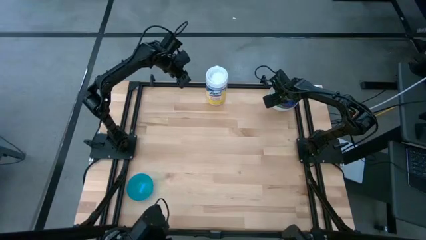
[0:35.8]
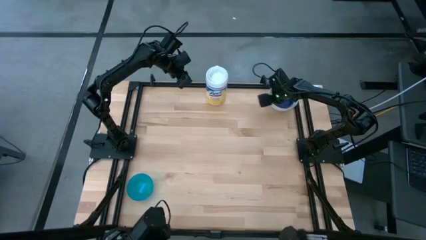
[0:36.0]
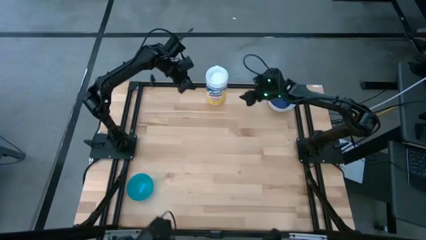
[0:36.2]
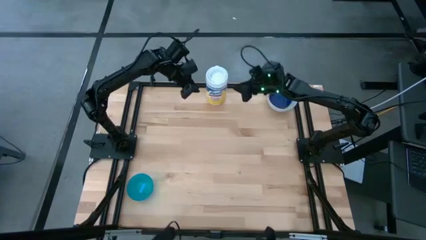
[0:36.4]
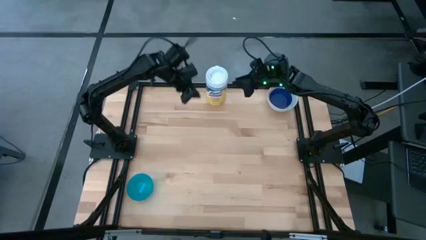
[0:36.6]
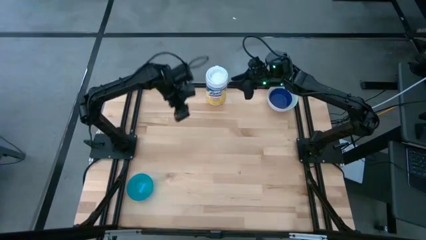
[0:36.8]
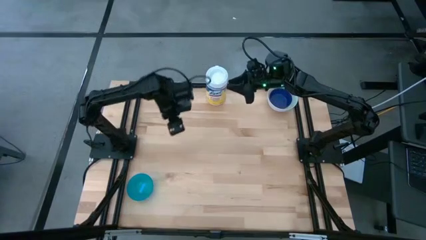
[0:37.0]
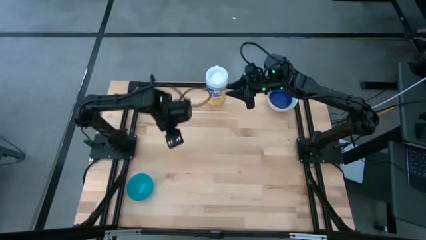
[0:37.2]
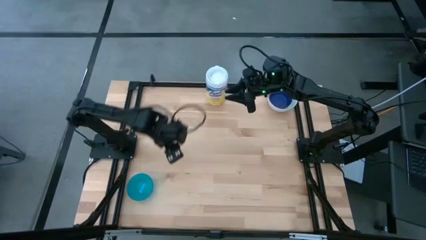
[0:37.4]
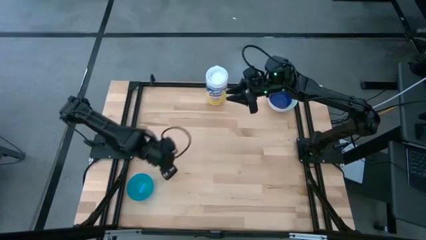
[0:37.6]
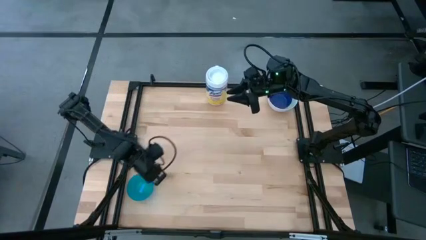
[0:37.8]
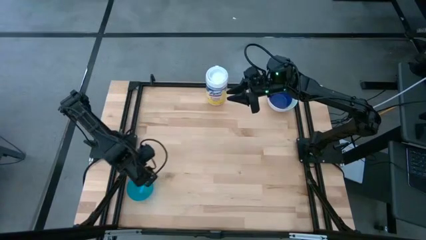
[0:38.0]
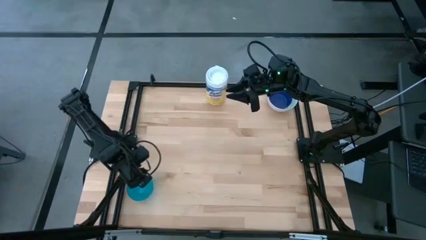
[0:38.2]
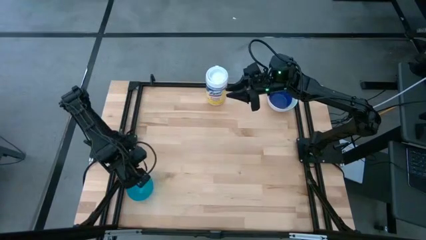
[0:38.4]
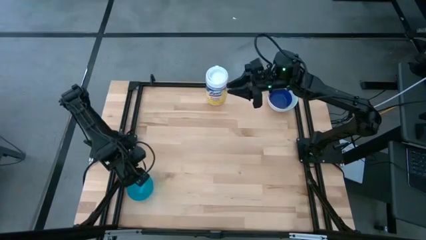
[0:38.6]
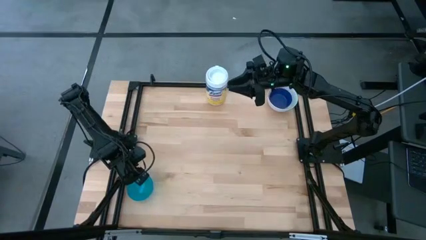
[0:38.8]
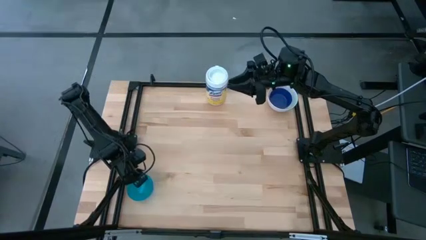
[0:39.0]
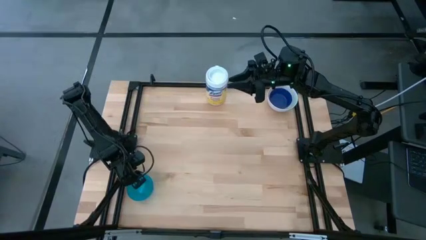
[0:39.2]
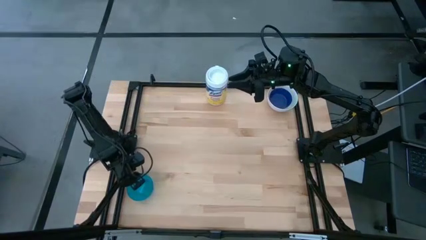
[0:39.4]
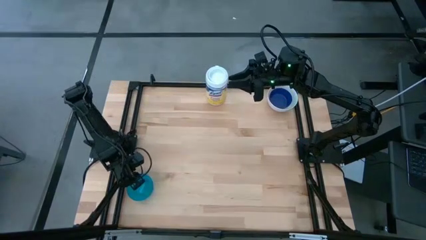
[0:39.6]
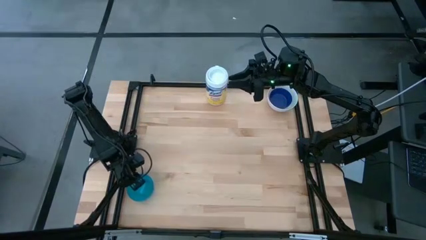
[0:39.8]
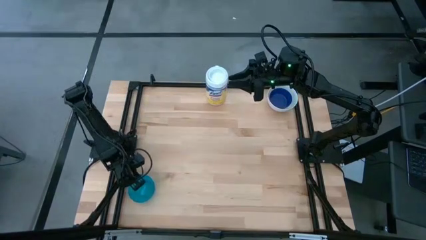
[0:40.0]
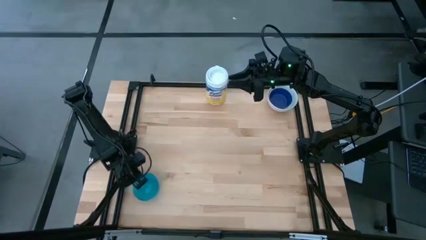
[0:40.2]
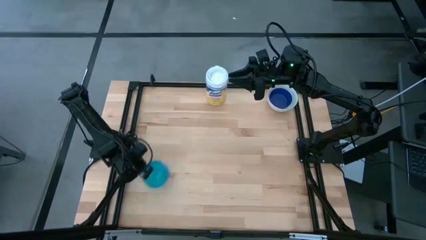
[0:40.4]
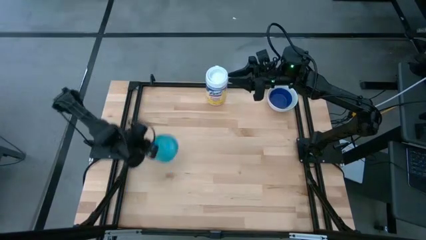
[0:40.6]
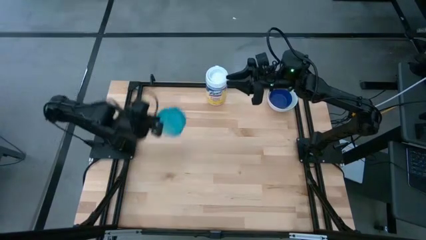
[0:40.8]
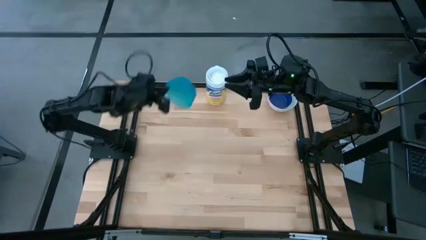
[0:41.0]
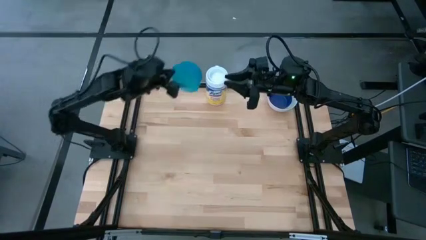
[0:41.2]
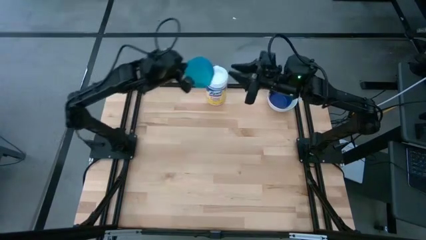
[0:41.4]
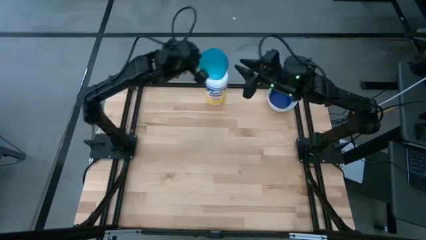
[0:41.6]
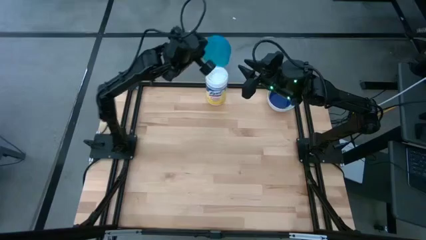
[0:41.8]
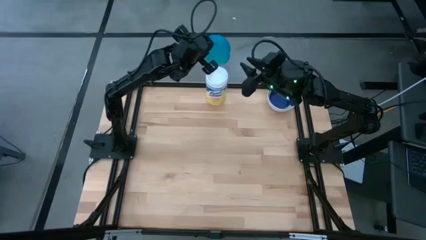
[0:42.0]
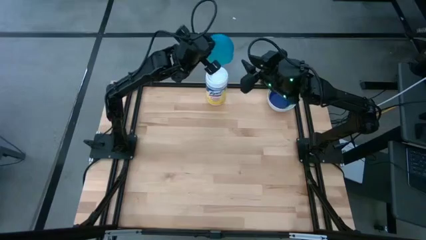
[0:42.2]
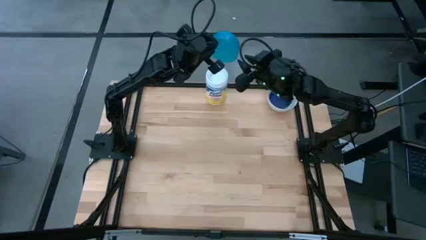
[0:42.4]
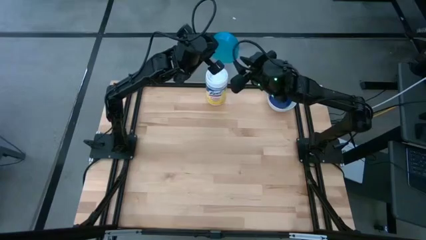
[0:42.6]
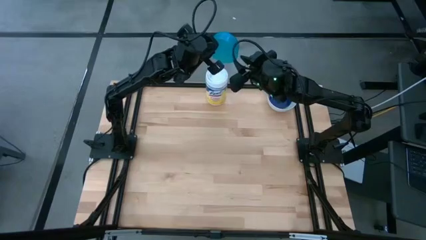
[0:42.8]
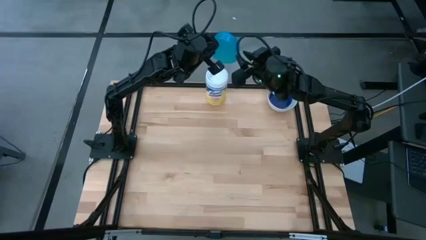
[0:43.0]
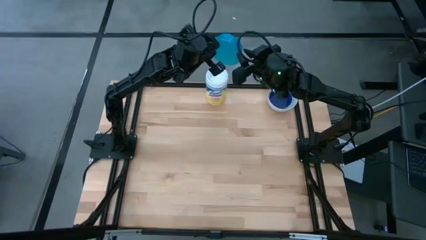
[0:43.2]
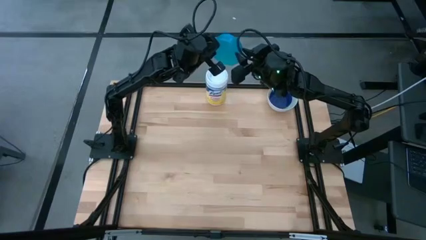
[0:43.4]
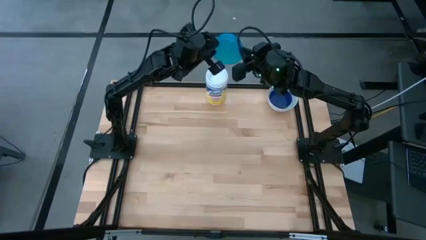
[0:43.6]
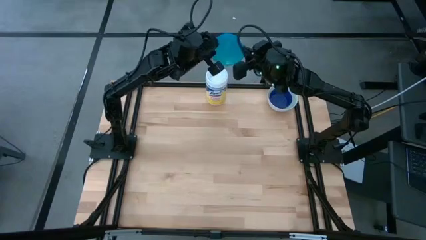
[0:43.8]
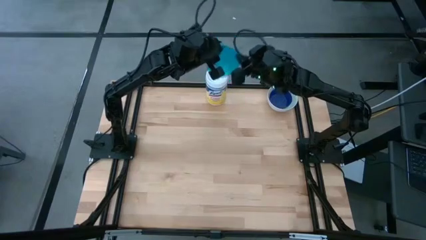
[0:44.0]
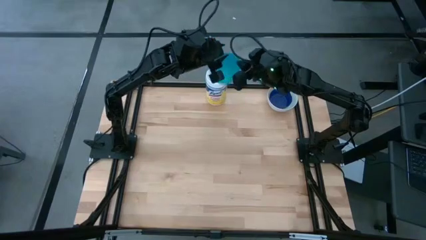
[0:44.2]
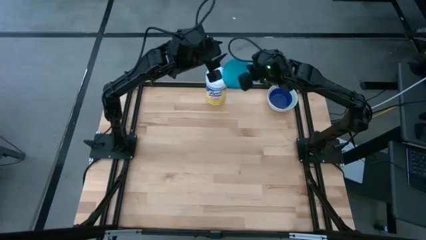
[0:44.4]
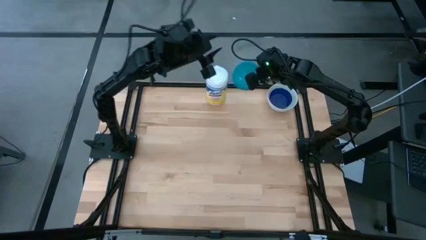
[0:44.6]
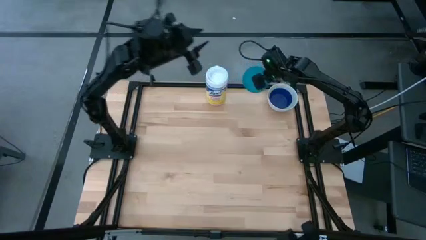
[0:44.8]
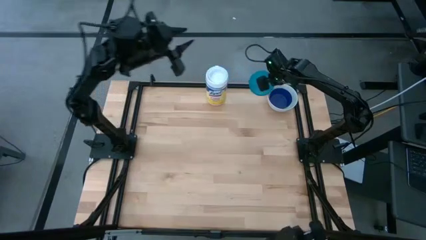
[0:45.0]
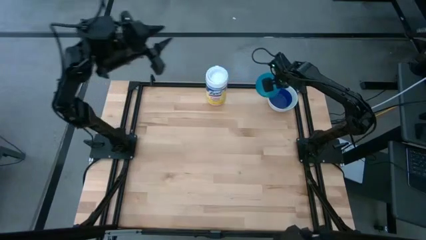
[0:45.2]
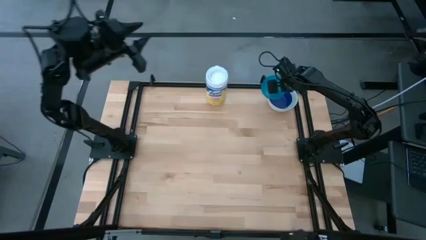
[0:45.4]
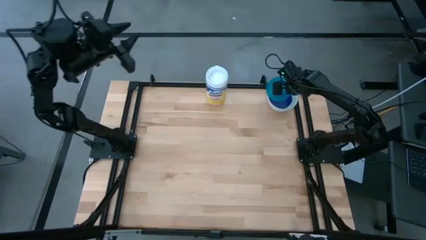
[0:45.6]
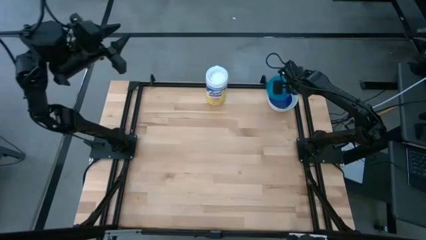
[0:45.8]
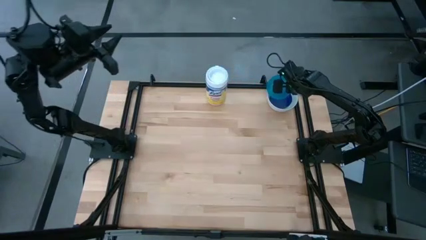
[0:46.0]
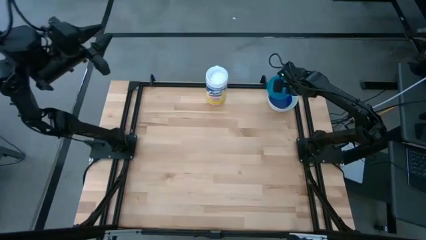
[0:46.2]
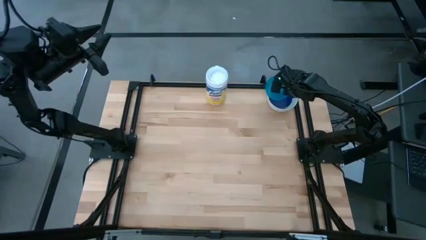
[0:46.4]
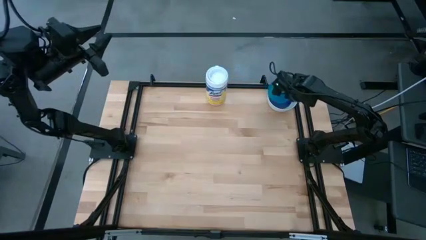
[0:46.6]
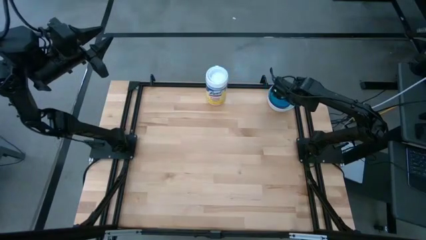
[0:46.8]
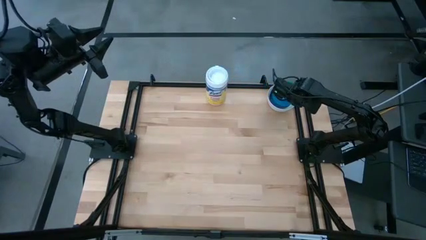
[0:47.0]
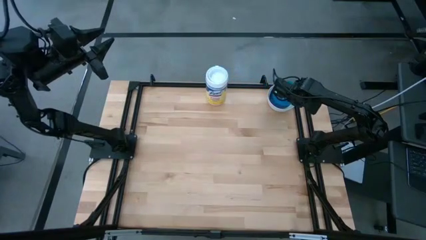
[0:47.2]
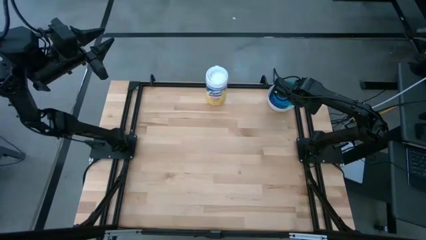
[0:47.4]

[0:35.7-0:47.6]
Stack the blue bowl on top of the dark blue bowl

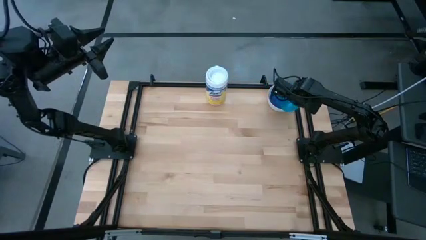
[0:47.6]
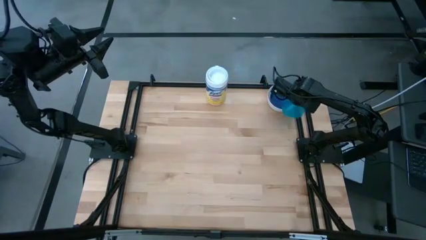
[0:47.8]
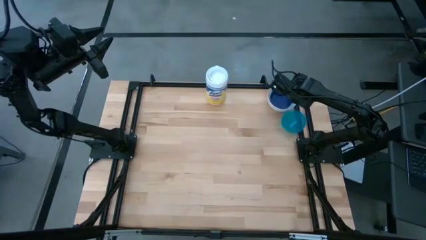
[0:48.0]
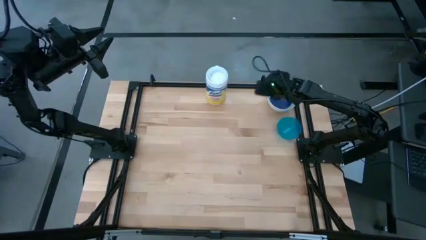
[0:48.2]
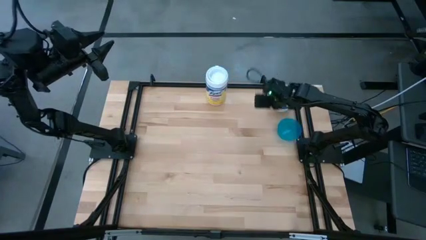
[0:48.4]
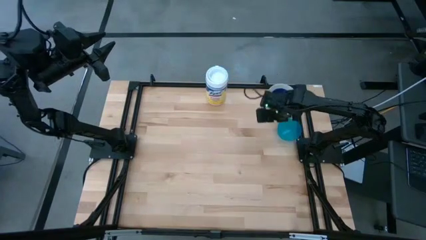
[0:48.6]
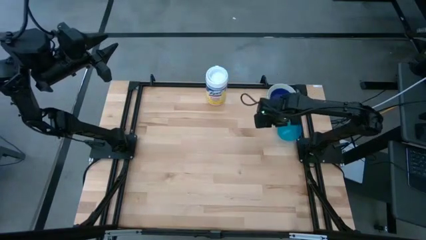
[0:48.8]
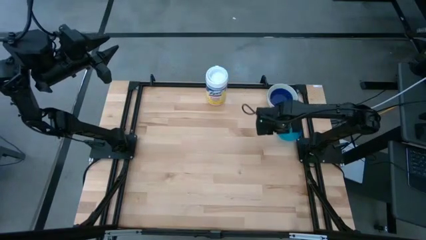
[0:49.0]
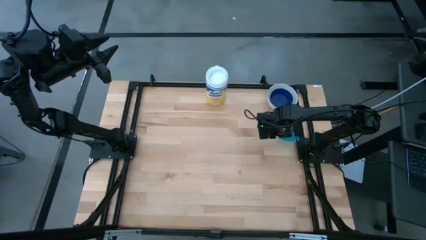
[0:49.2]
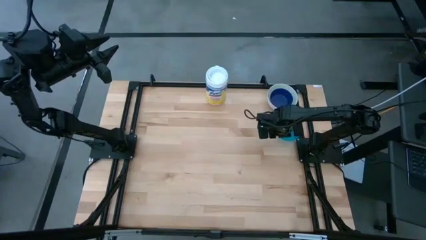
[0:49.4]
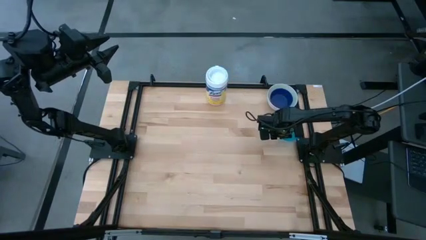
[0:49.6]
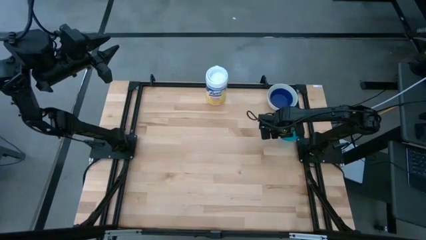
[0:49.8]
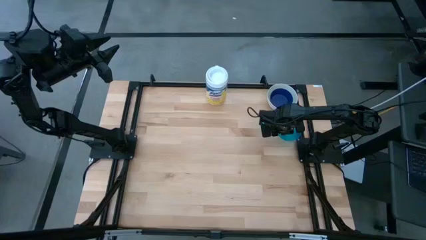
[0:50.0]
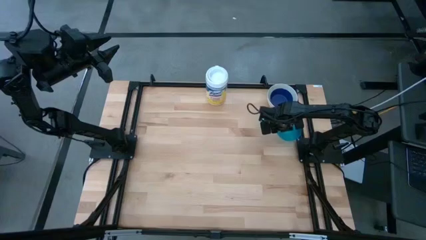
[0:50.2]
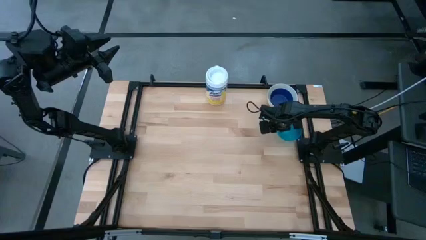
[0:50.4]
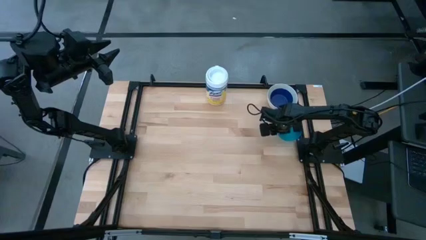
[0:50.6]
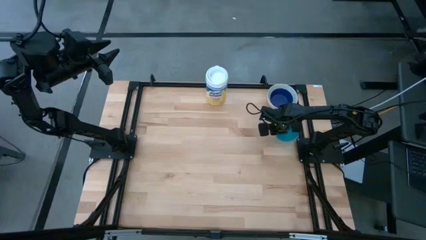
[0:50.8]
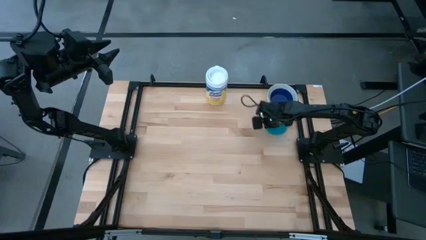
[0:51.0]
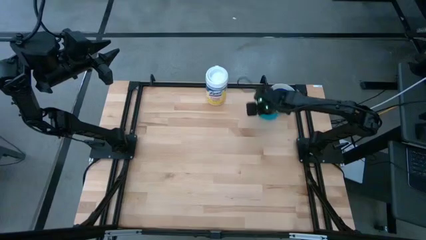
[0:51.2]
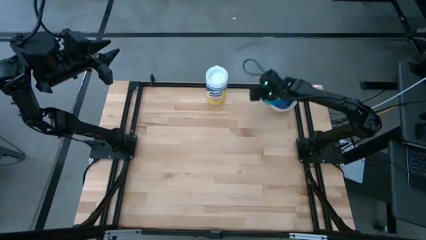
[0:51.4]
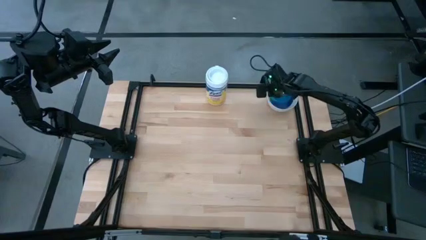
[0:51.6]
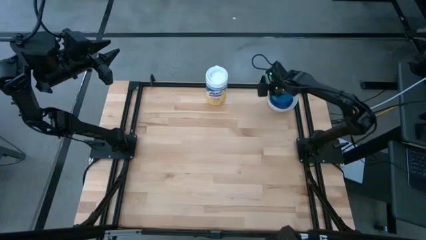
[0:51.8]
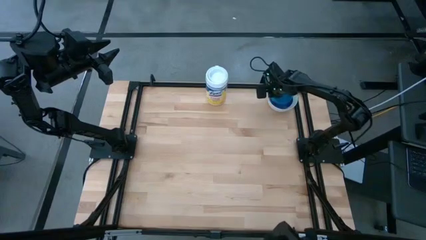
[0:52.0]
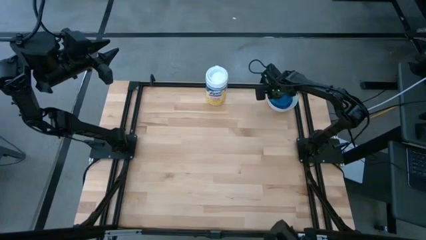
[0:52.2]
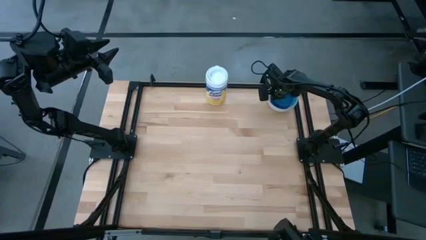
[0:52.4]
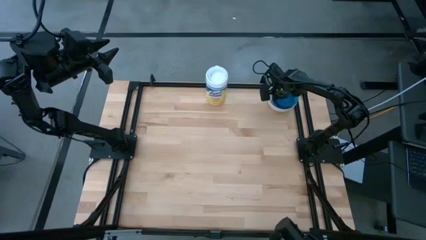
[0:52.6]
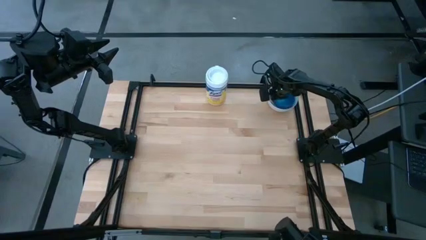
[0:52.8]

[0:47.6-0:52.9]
Stack the blue bowl on top of the dark blue bowl
